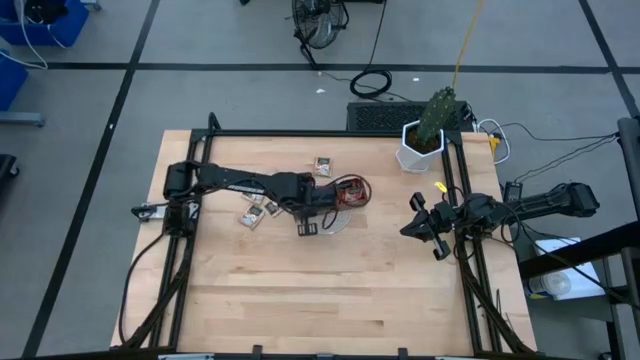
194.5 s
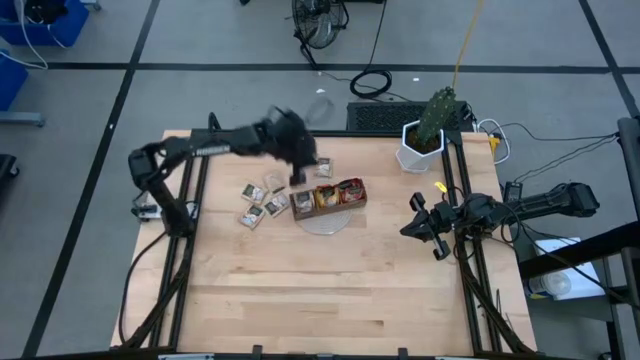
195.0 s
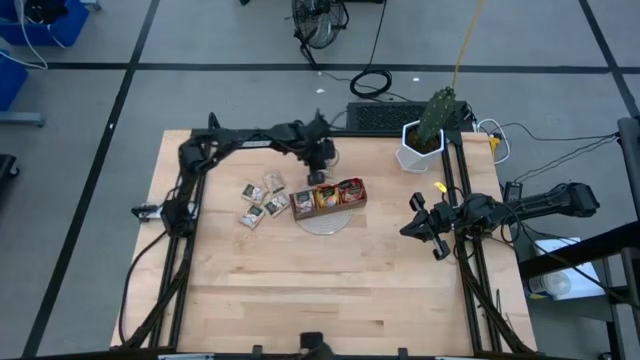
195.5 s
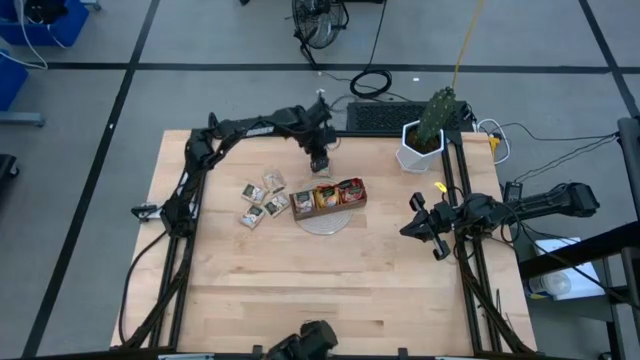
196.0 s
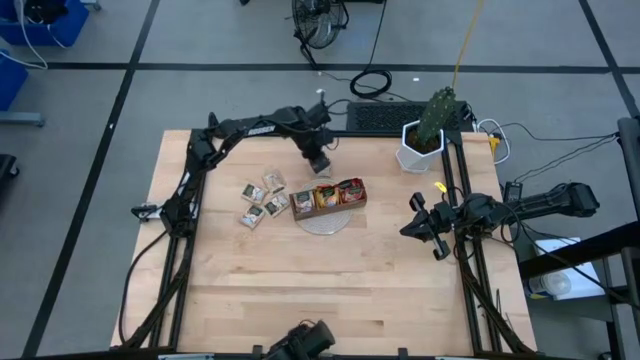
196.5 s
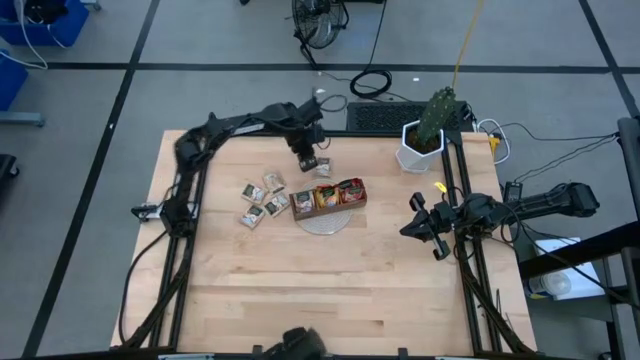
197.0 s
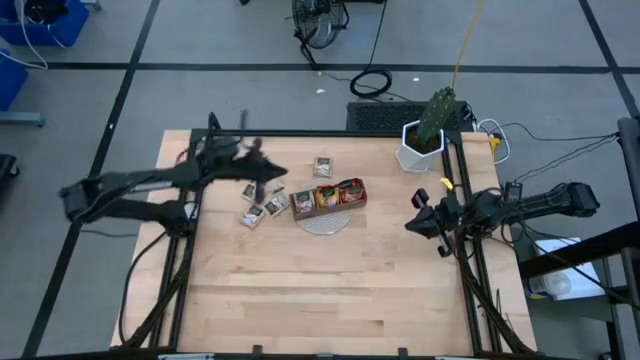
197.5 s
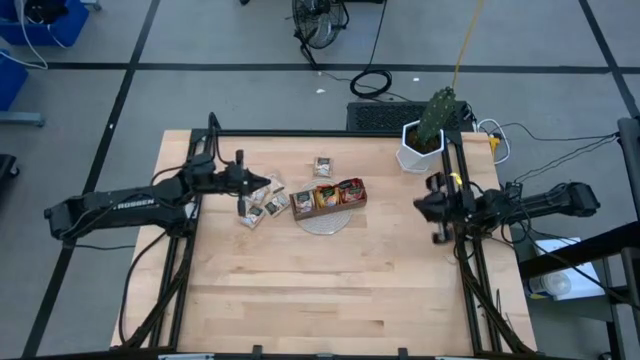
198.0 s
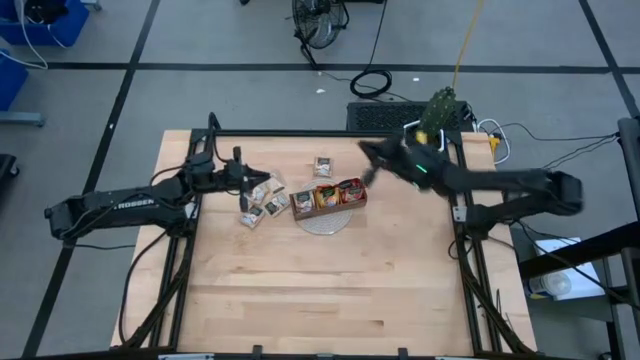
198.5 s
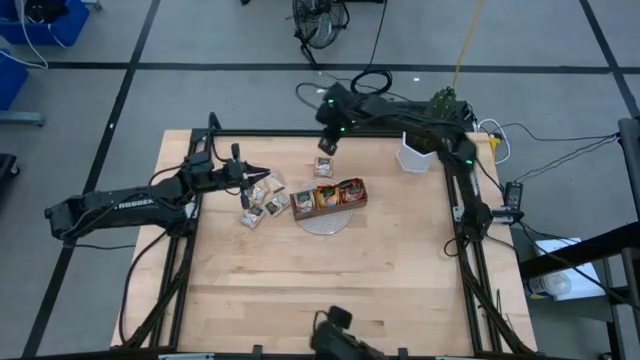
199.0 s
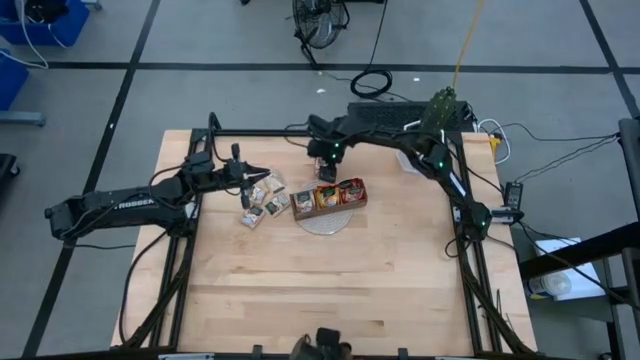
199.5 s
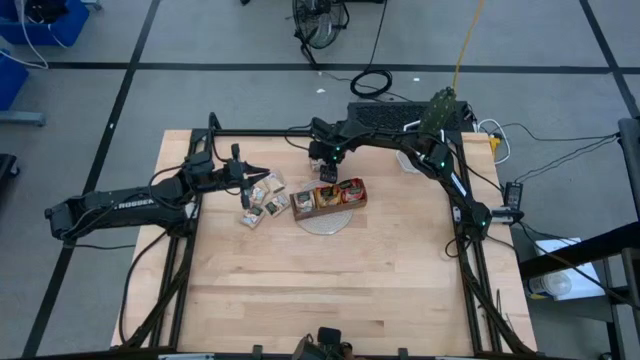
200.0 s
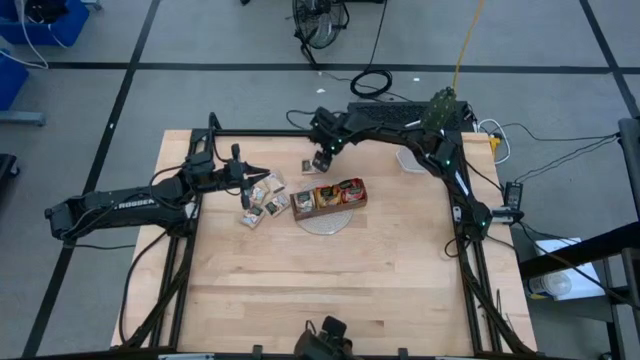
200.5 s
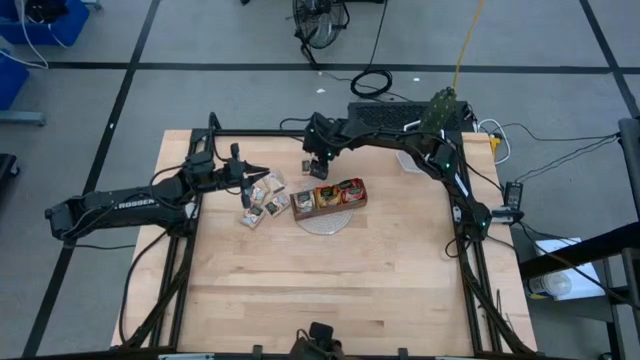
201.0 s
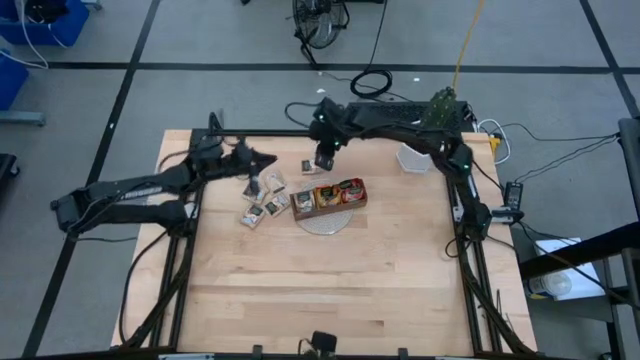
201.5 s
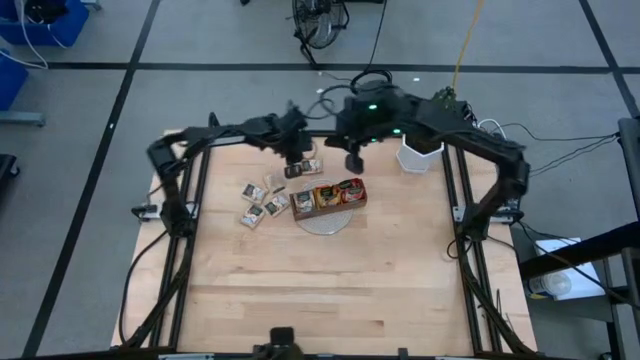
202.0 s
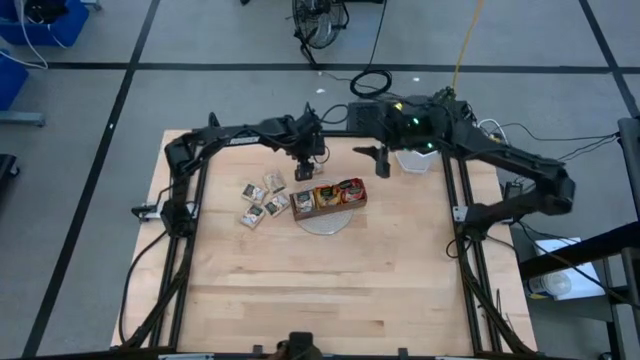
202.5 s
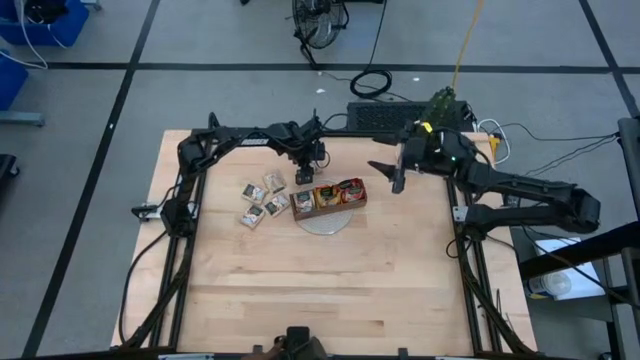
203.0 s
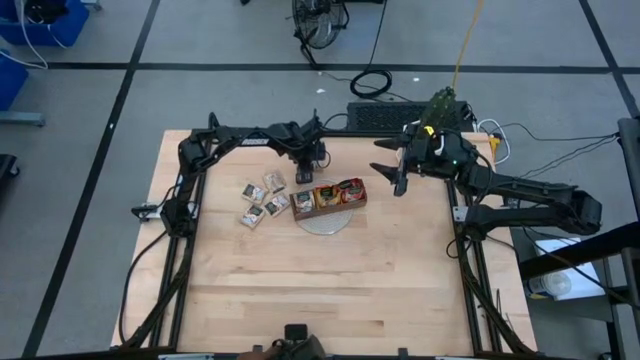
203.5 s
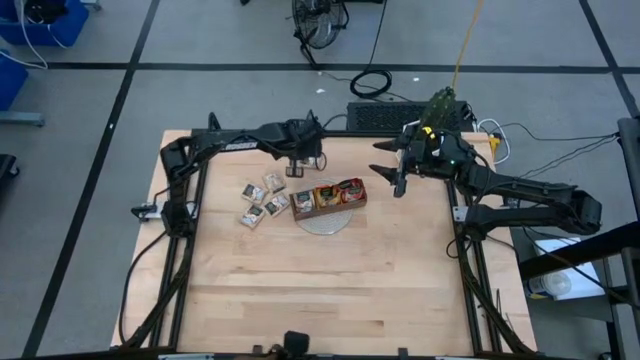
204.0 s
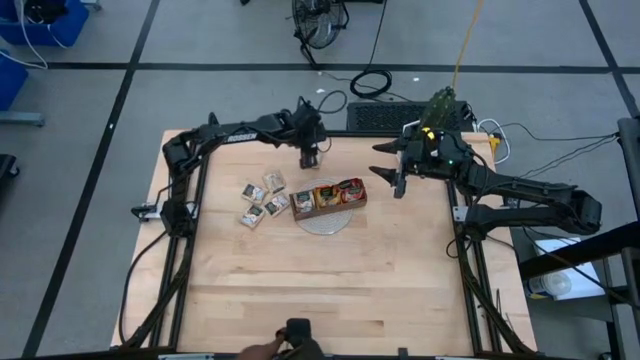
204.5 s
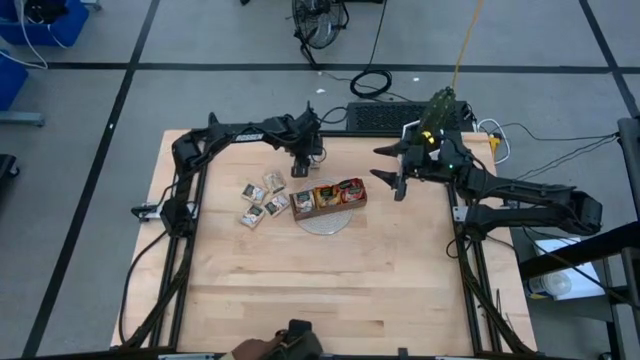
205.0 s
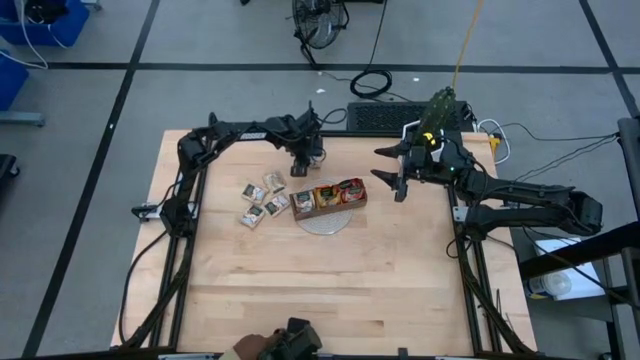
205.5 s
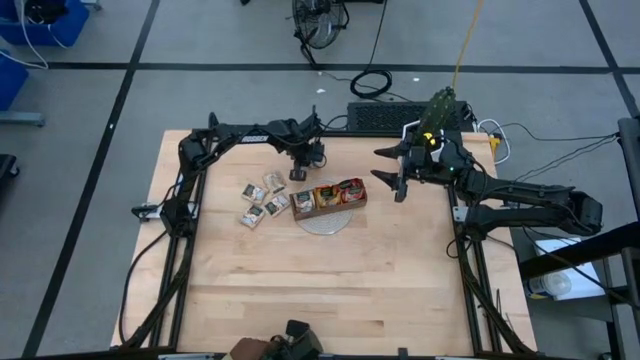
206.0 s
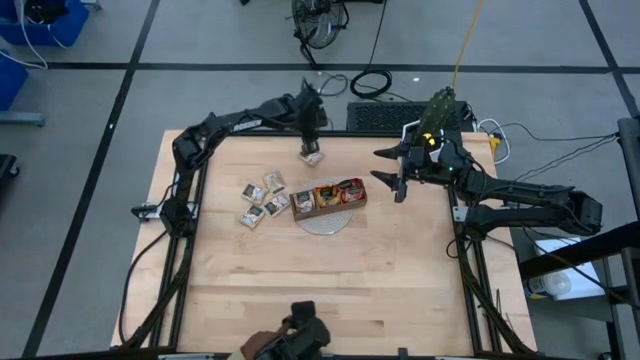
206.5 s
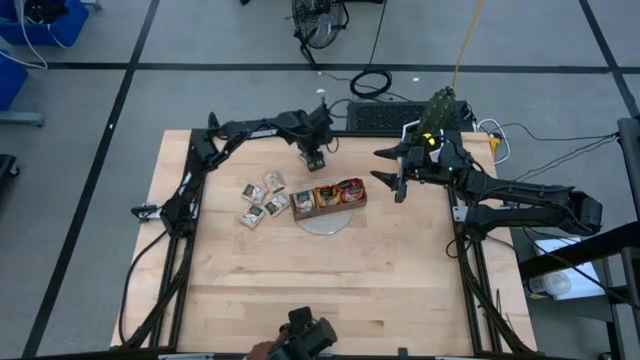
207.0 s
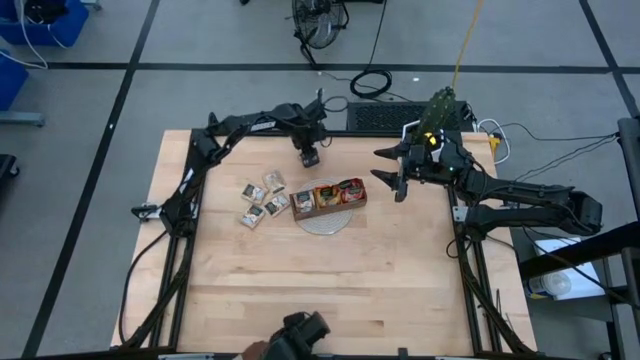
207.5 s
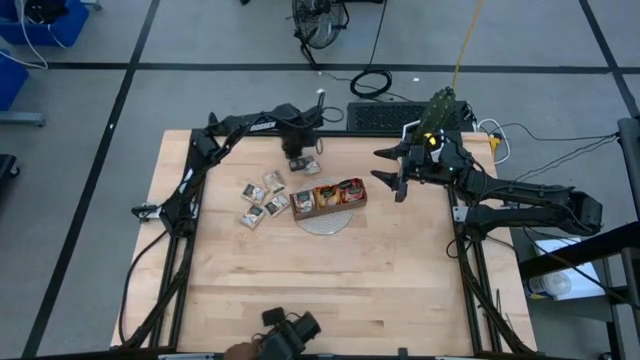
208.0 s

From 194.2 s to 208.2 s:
Task: Pick & Place Tea
Put the tan gold tea bag into the left section of the wood organizer

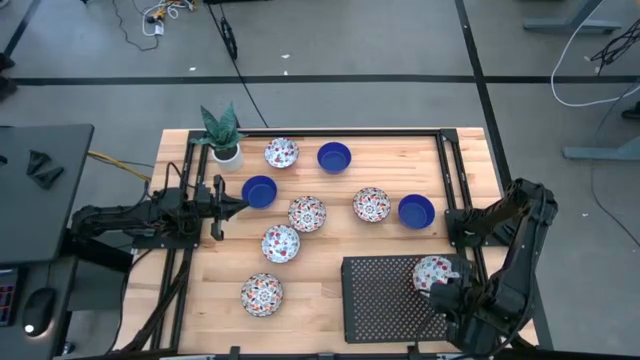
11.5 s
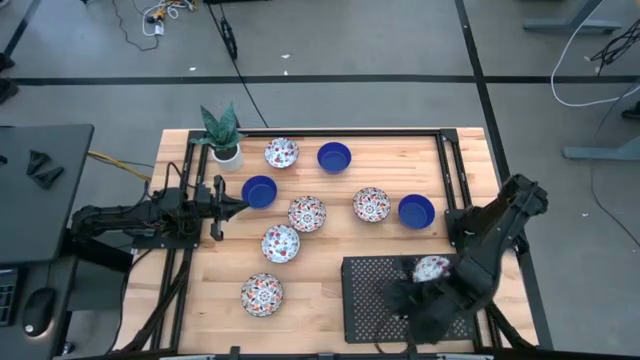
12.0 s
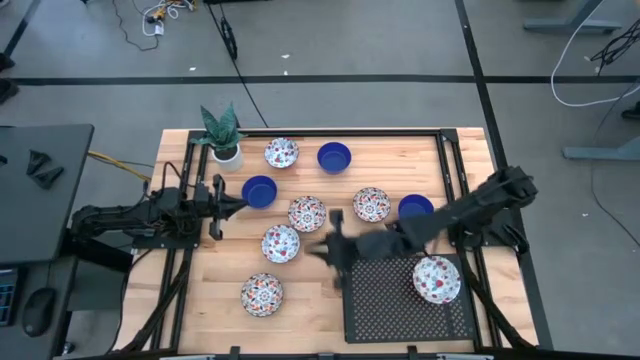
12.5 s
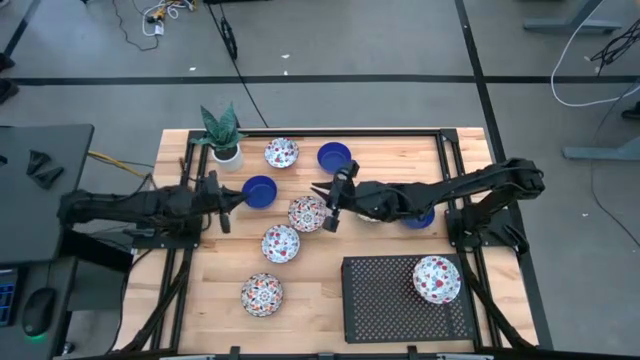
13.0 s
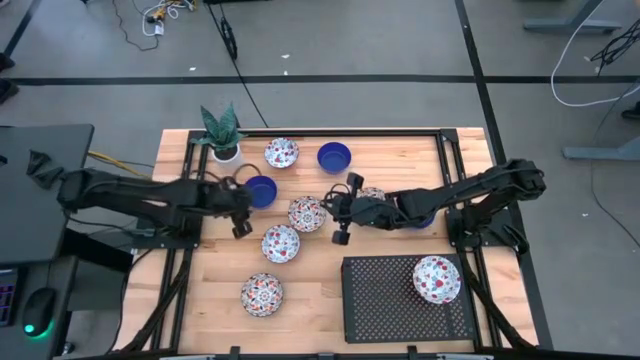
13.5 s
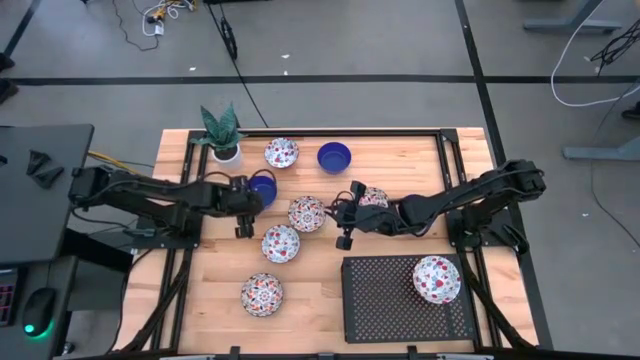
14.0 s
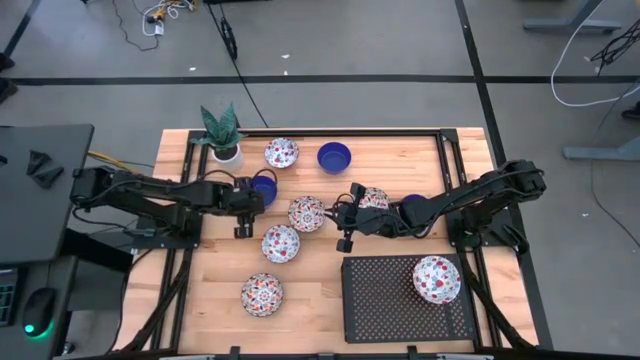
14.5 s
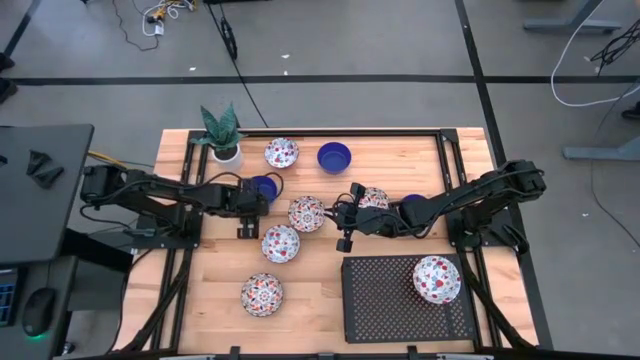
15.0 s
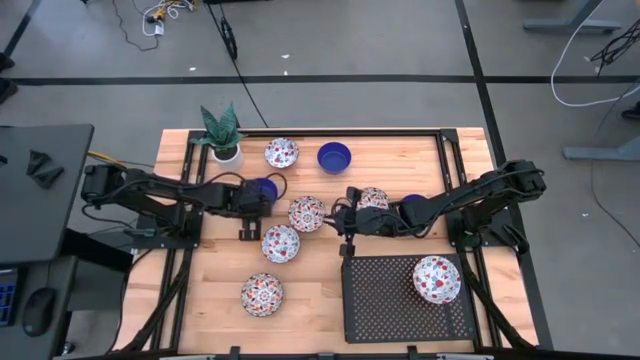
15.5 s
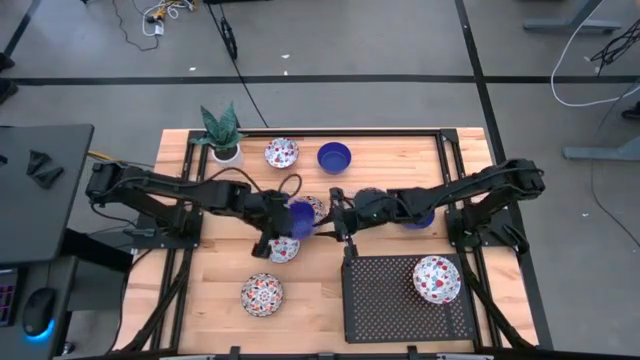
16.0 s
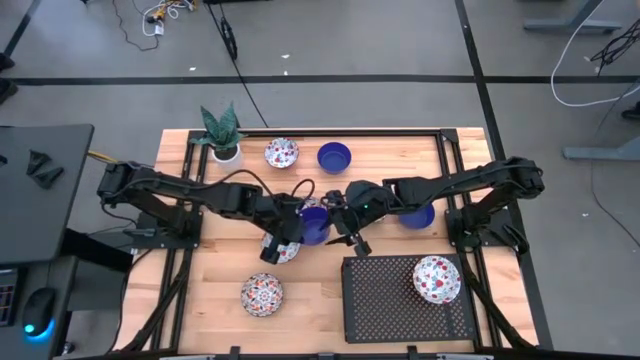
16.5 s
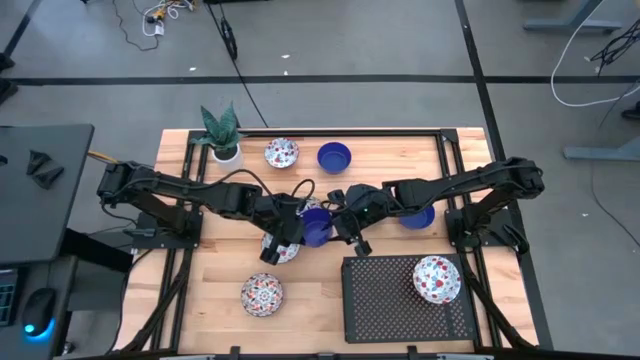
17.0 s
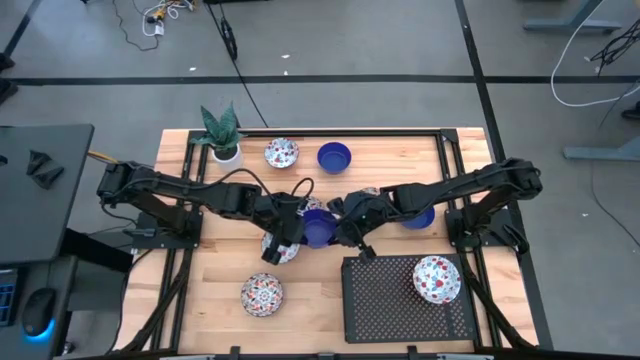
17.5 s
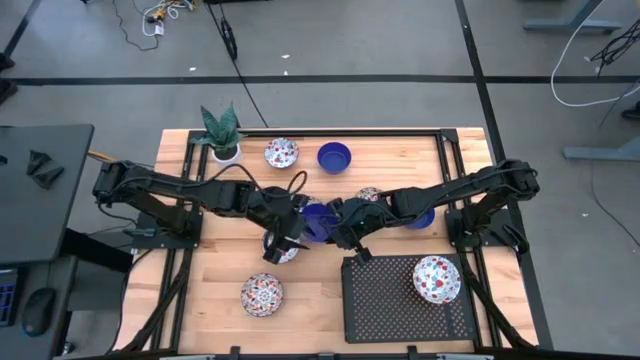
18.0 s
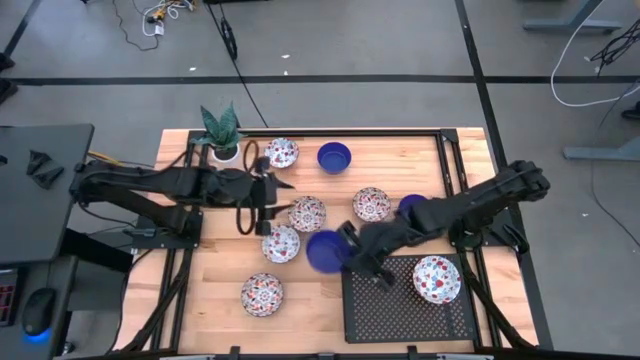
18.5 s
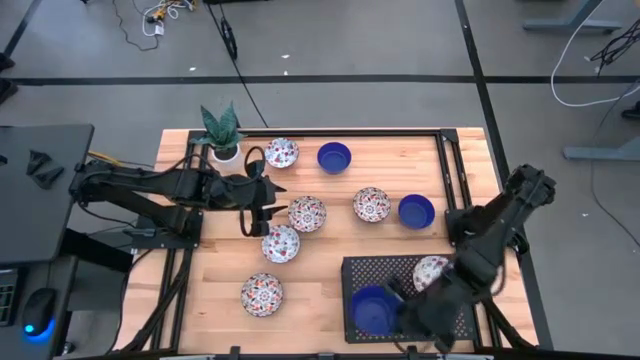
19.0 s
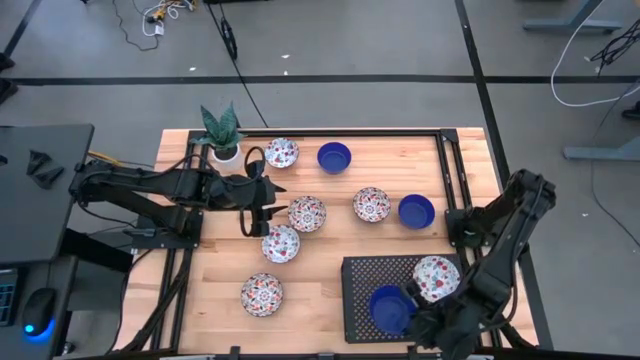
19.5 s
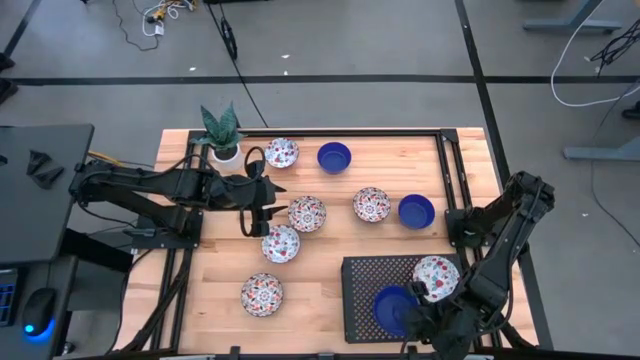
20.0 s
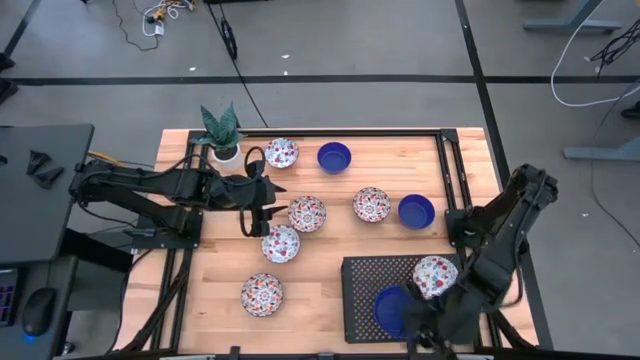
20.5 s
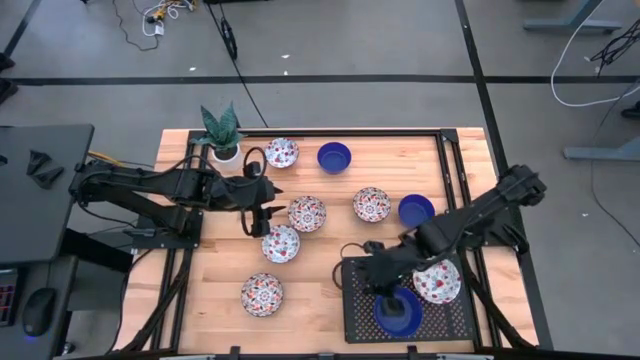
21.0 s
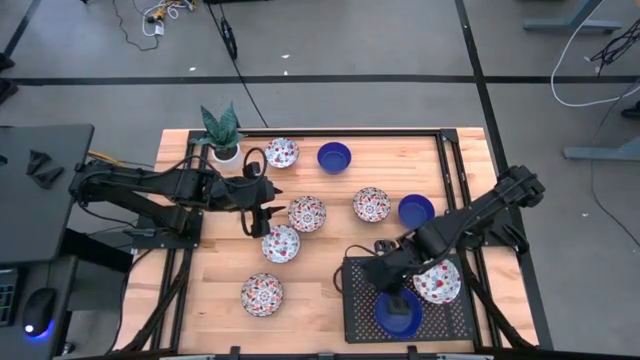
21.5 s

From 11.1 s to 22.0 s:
Task: Pick & Place Mini bowls
Put the left blue bowl on the shelf
